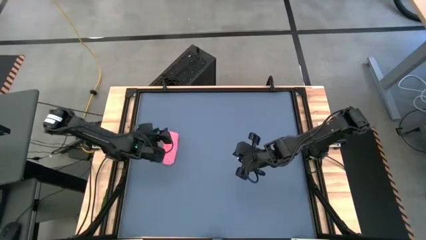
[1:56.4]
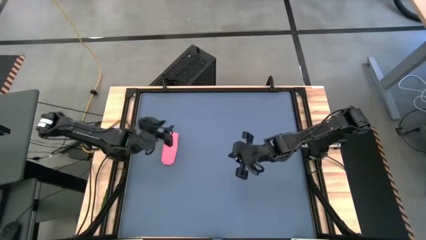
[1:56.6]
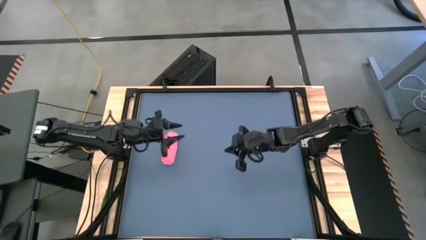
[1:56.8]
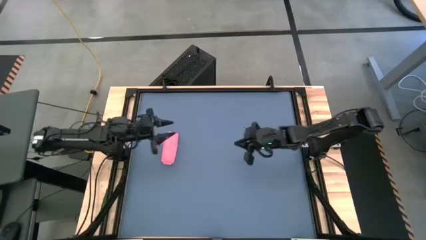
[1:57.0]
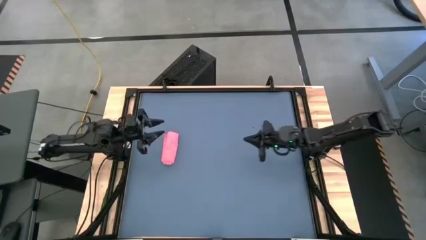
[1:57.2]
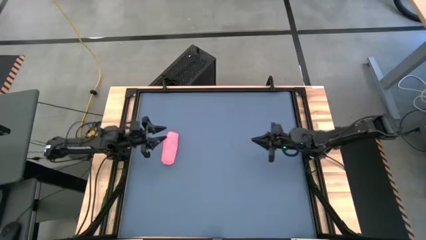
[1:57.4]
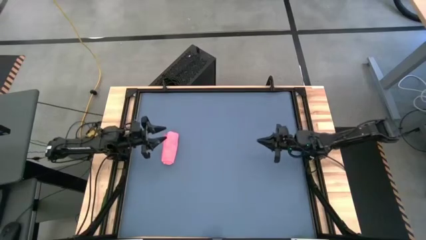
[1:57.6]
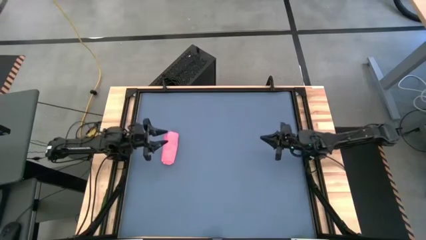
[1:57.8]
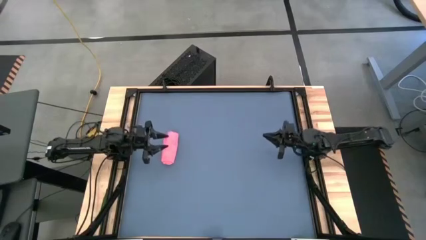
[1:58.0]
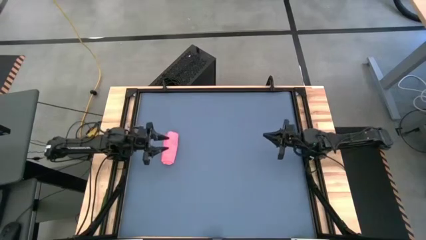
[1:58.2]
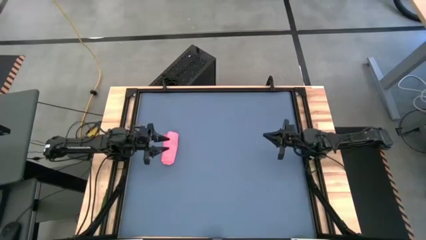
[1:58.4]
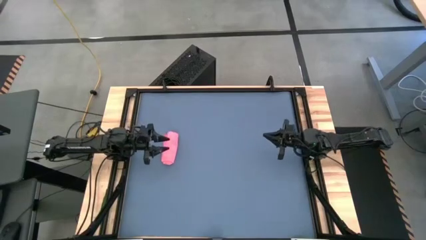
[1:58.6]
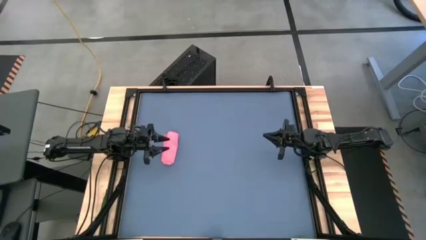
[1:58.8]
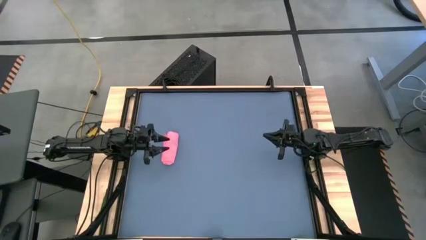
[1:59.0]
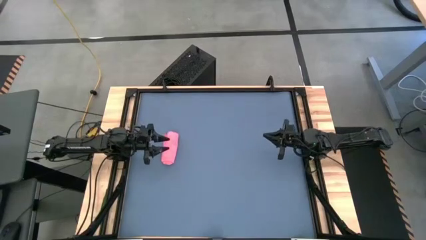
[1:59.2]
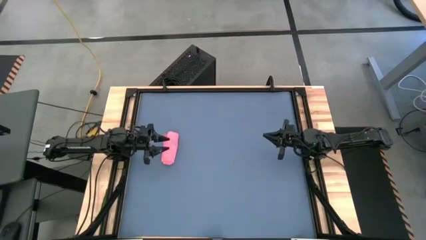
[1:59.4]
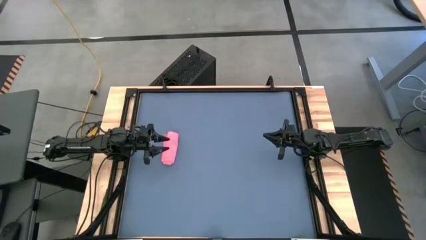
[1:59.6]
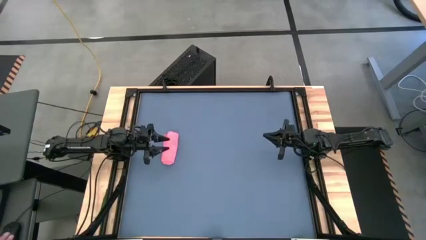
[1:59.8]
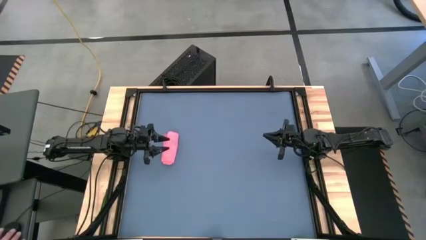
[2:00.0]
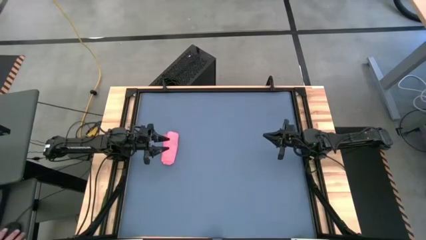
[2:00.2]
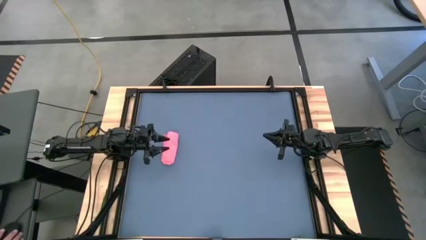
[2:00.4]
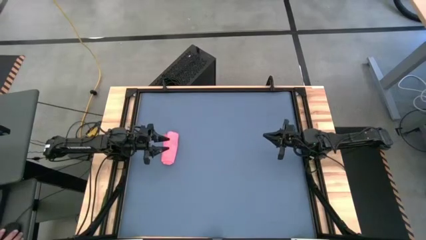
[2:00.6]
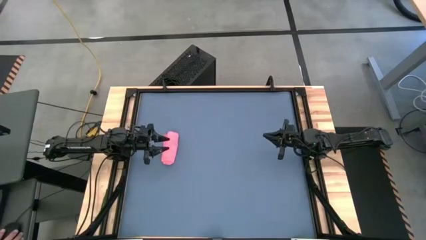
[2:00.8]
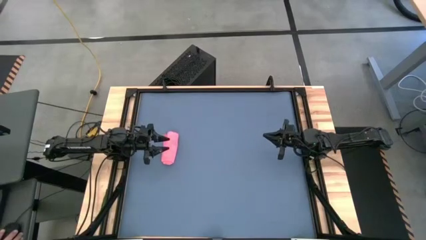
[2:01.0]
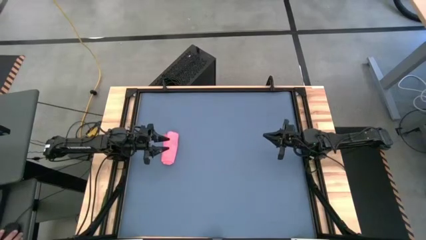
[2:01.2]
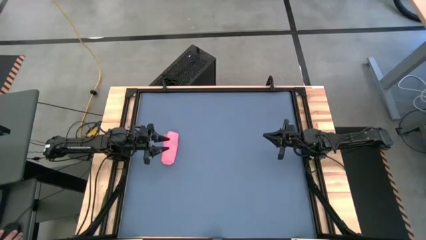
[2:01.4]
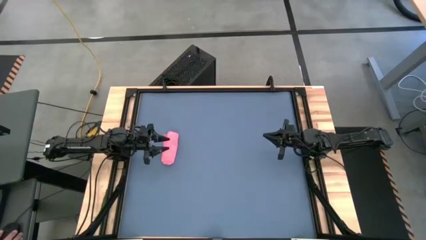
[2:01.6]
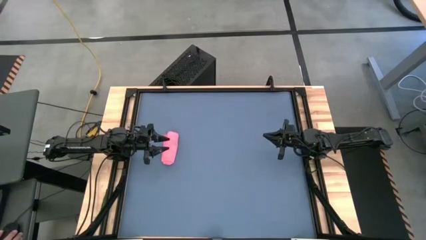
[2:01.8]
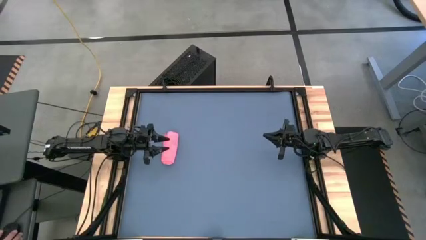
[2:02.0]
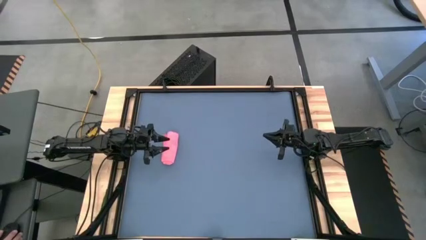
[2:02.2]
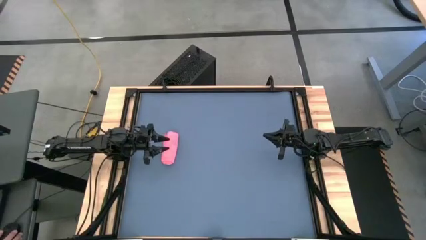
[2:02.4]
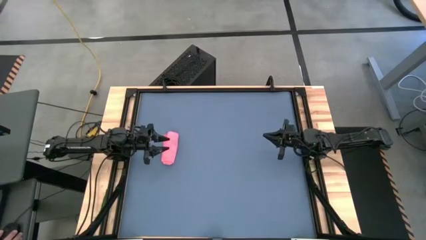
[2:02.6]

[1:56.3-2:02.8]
Task: Roll towel into tight, uniform cylinder
Return to Home Position

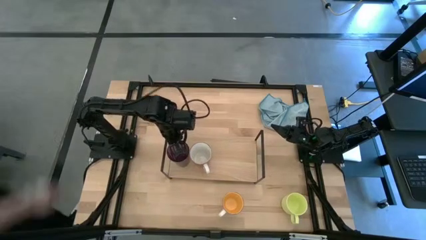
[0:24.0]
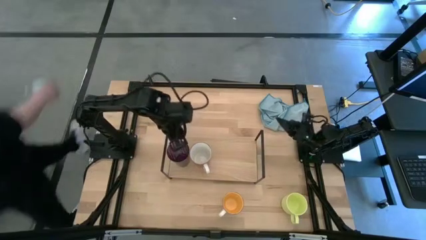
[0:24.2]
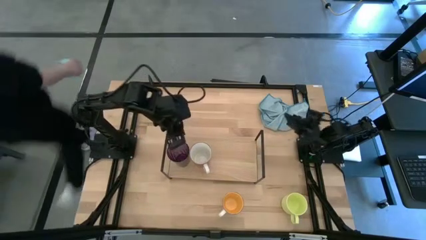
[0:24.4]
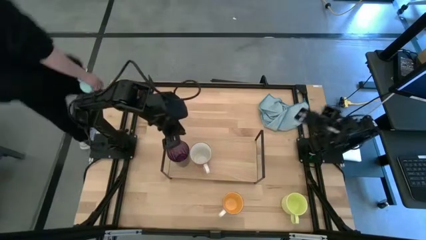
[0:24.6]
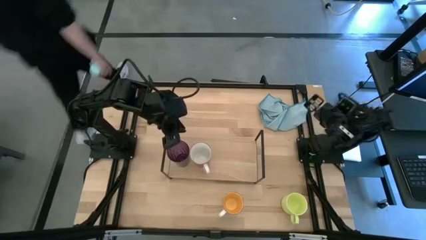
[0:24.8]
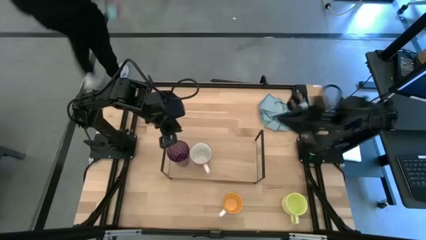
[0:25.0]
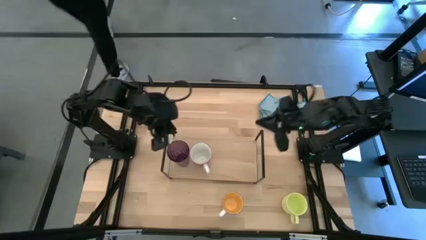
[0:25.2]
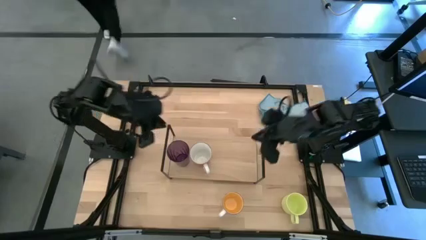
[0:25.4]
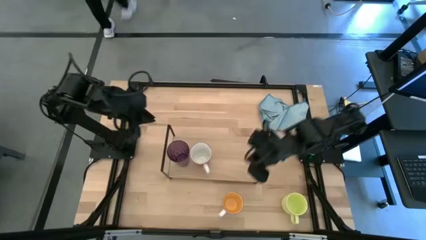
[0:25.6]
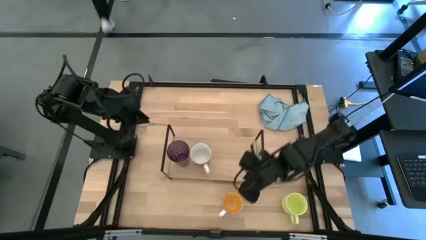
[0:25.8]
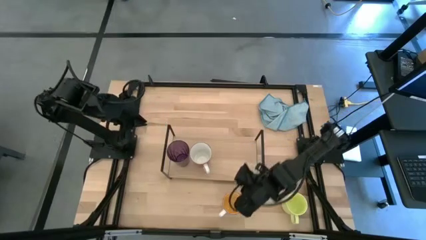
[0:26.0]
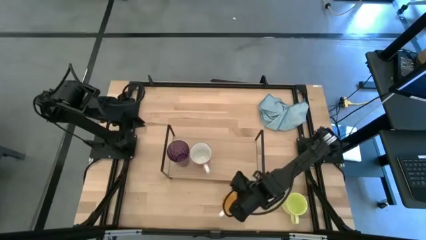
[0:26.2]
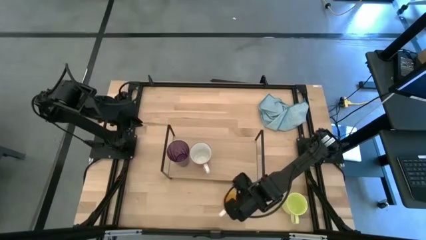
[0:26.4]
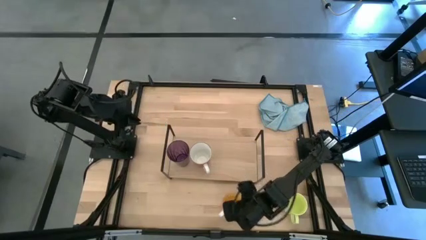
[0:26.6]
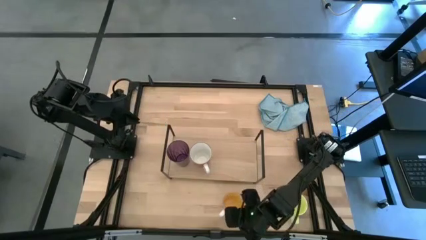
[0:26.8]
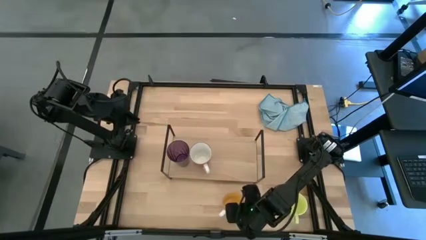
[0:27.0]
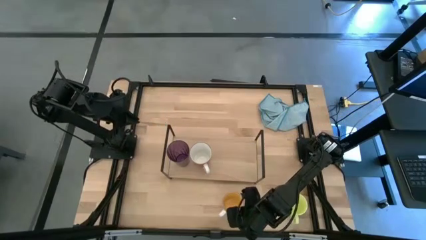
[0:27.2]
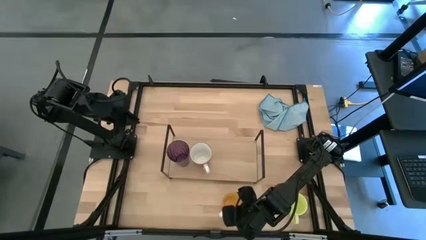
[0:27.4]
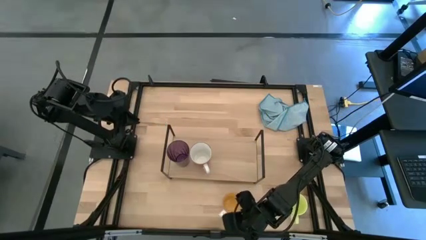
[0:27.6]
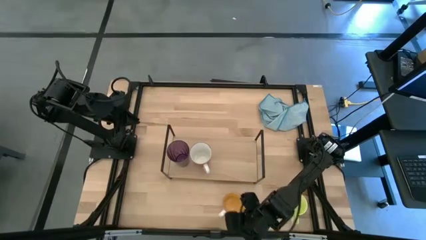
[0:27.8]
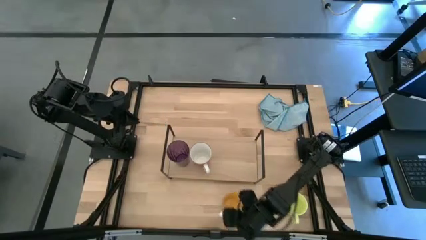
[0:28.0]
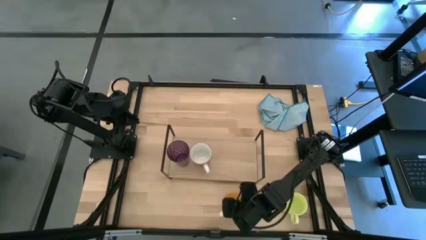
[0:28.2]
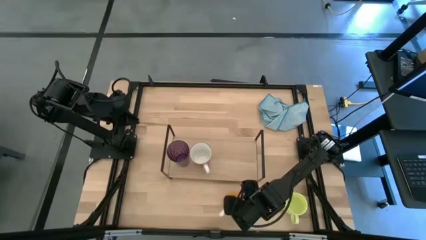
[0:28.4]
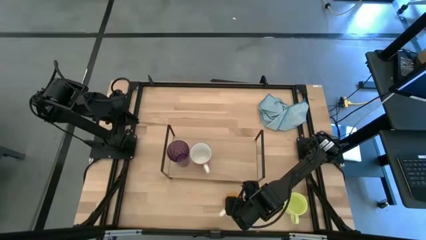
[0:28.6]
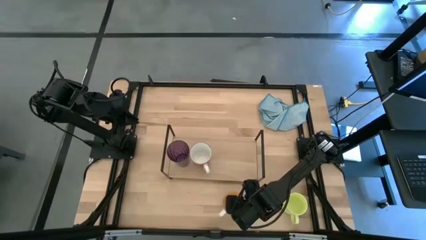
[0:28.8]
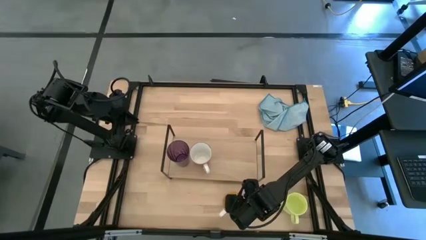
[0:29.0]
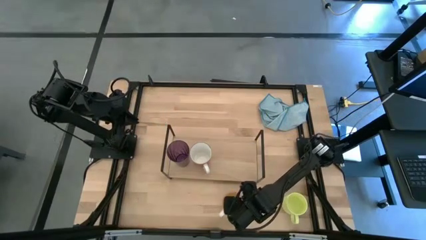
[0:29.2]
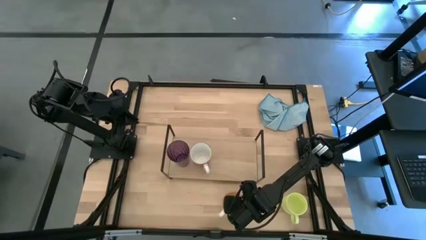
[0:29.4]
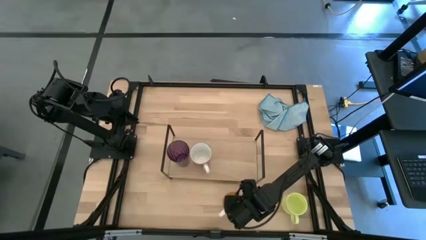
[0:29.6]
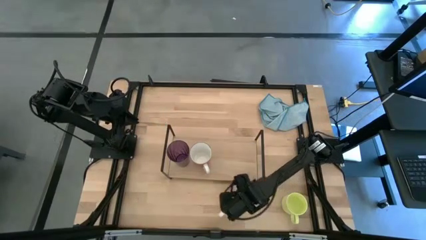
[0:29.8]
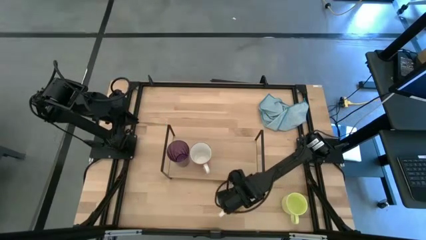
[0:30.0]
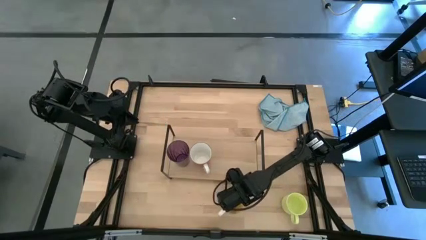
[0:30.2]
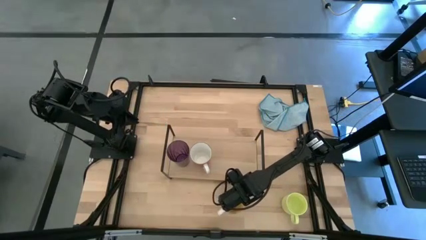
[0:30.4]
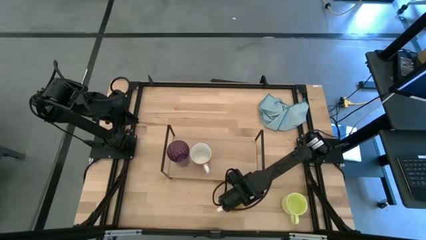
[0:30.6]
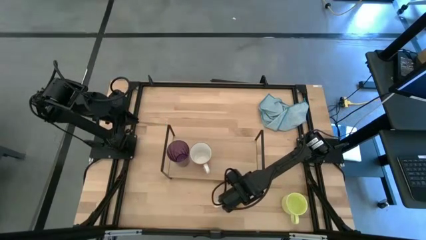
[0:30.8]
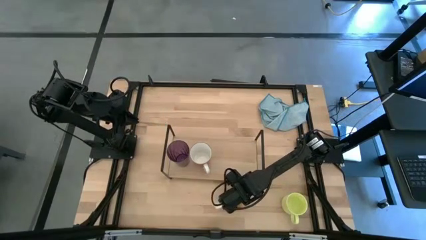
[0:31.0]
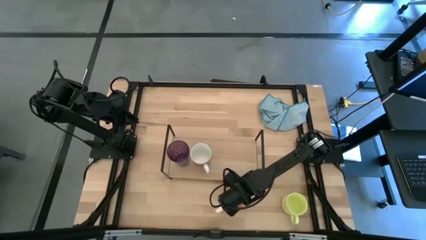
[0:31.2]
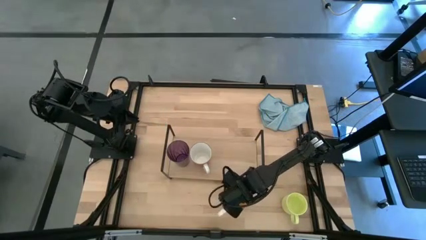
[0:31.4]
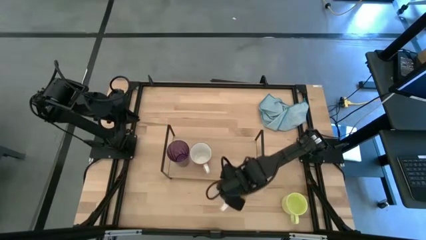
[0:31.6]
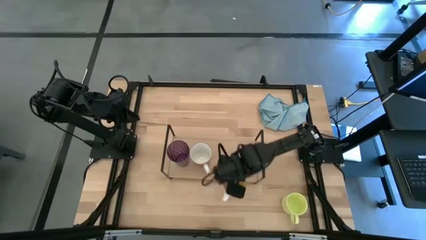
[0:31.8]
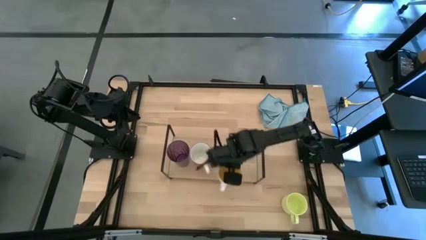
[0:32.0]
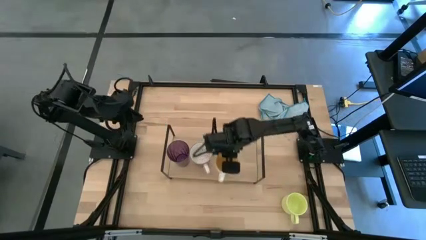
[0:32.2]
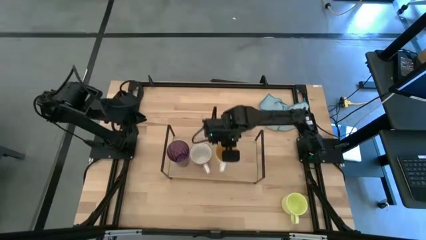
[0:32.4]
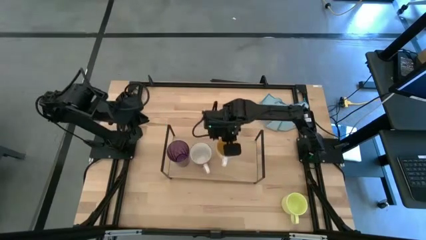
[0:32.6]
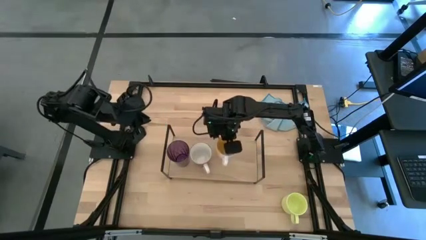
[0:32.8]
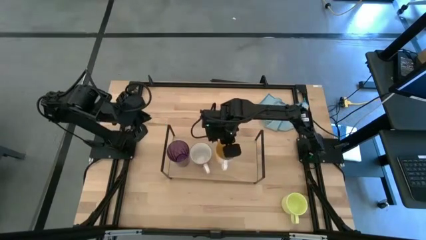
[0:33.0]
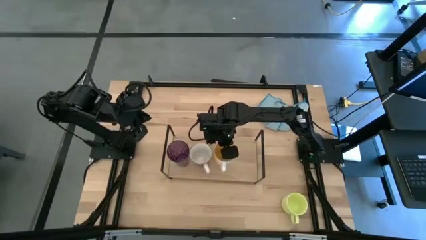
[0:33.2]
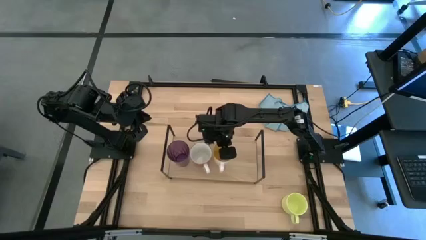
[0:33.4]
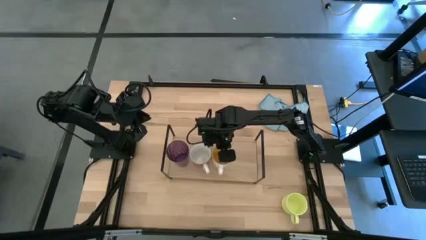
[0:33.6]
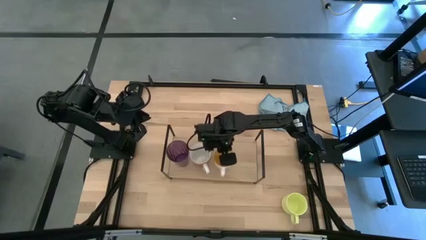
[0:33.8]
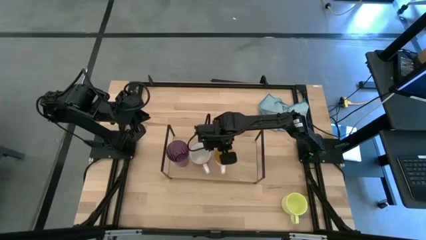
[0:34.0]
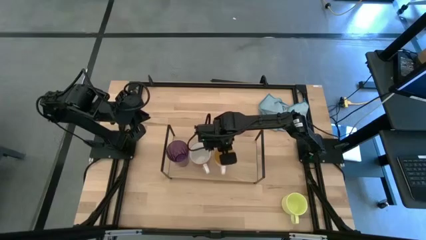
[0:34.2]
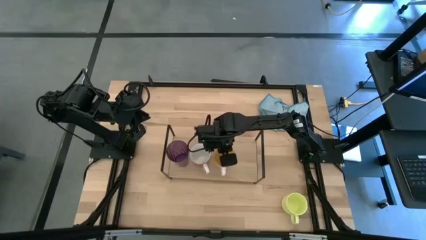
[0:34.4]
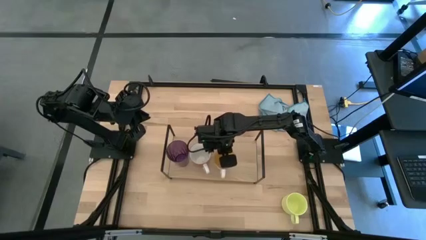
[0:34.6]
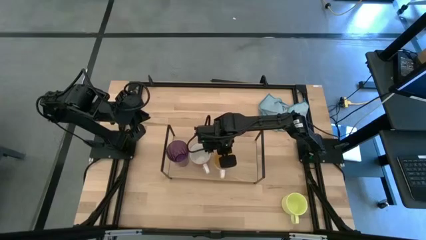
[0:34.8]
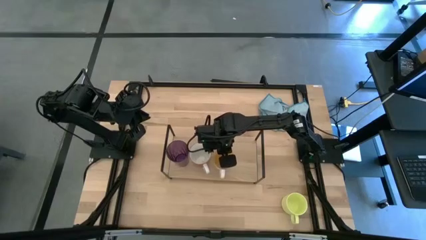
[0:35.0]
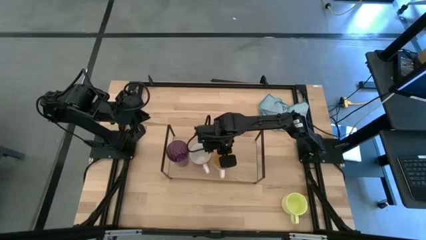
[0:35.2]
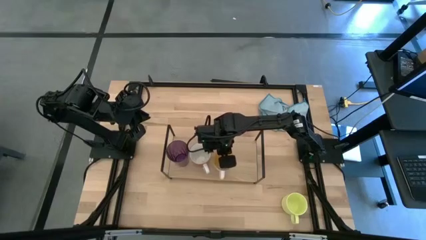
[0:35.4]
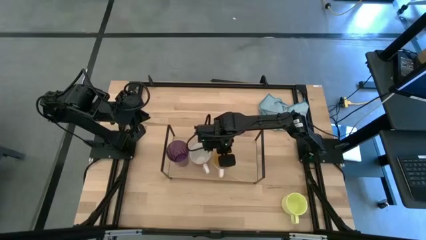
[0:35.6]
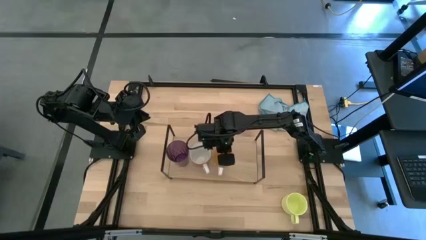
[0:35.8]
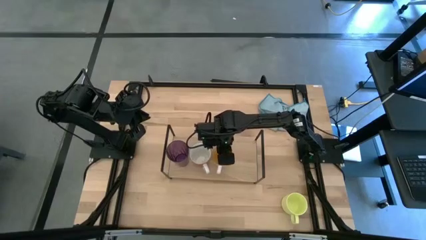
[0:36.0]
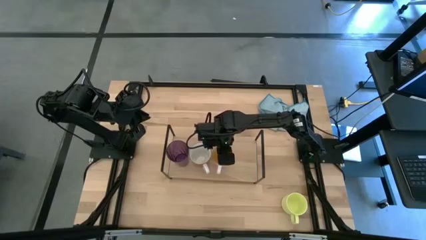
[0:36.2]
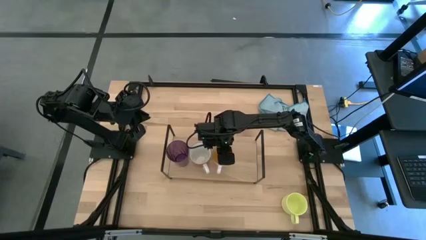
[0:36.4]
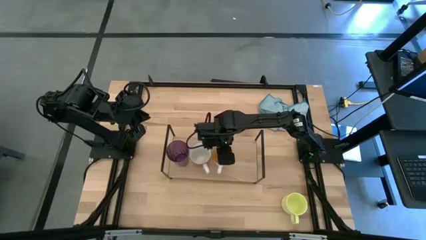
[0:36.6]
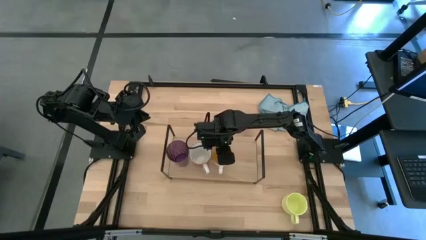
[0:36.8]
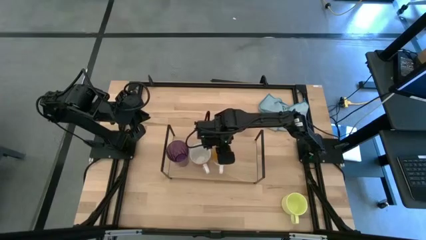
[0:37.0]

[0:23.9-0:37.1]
Task: Stack small to large cups/mugs on shelf
Put the yellow mug on the shelf
